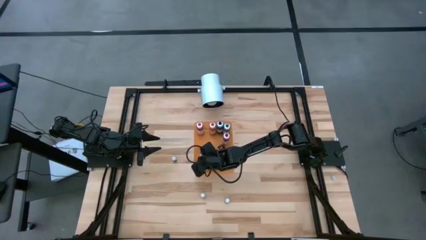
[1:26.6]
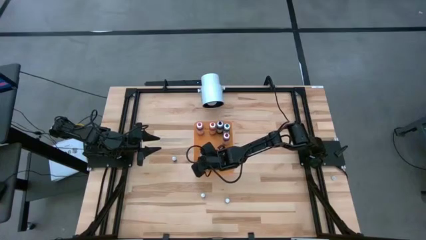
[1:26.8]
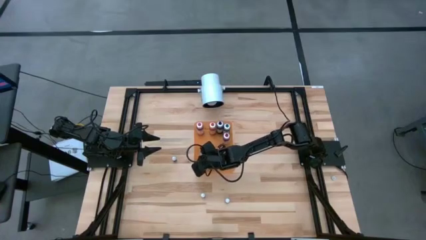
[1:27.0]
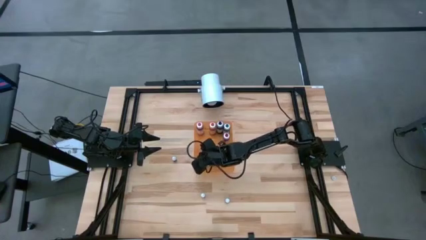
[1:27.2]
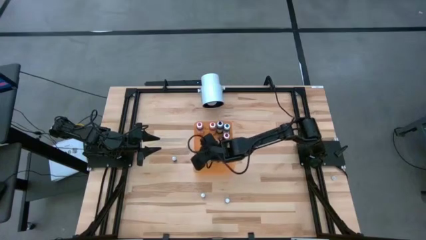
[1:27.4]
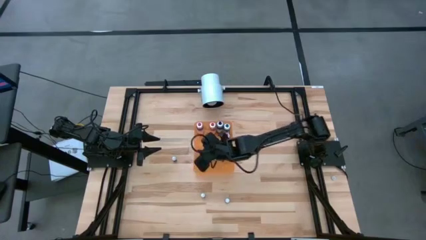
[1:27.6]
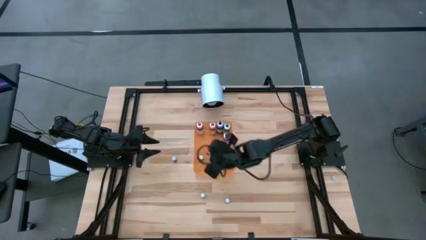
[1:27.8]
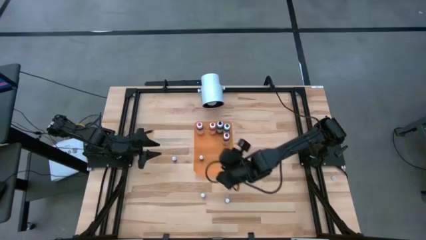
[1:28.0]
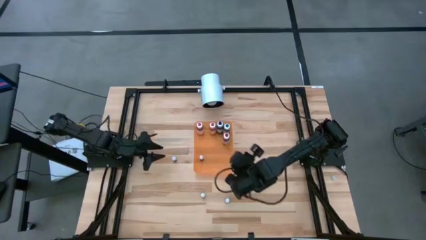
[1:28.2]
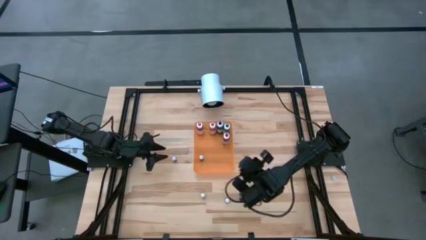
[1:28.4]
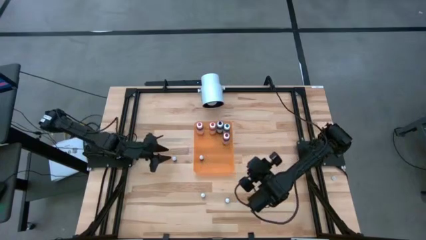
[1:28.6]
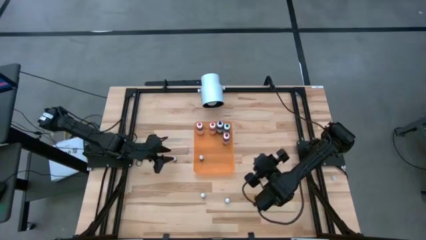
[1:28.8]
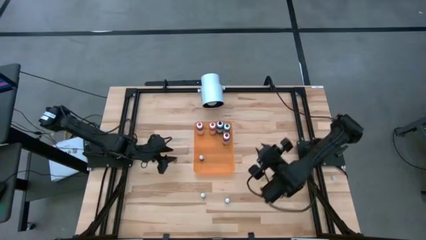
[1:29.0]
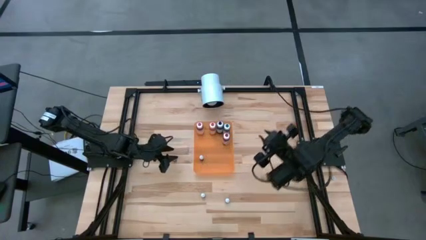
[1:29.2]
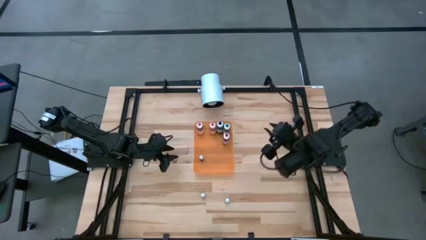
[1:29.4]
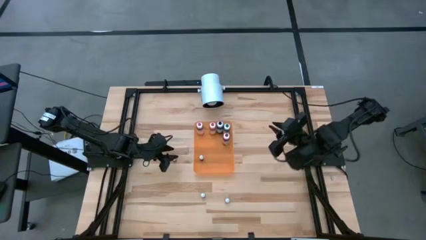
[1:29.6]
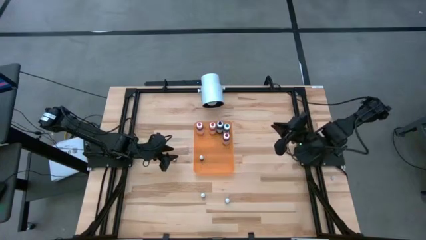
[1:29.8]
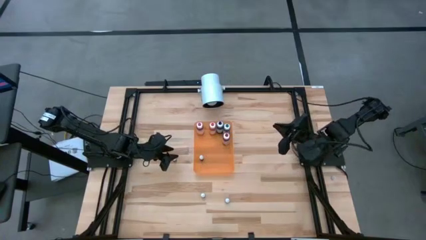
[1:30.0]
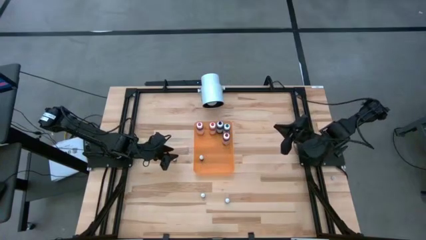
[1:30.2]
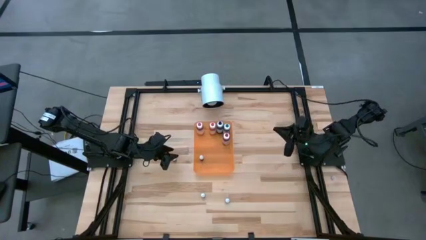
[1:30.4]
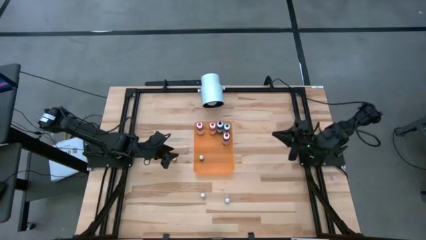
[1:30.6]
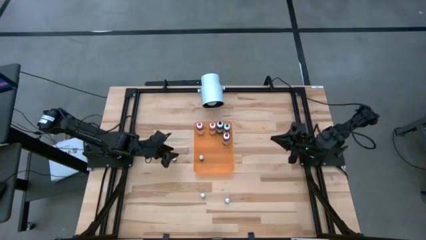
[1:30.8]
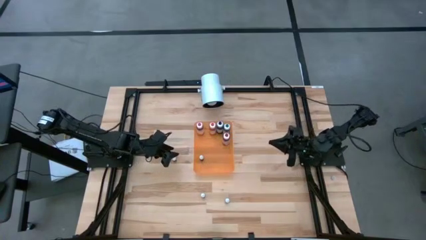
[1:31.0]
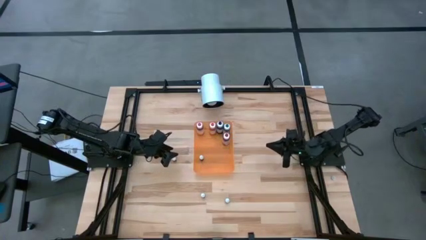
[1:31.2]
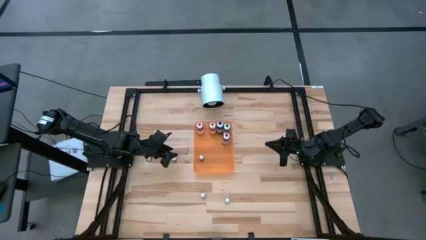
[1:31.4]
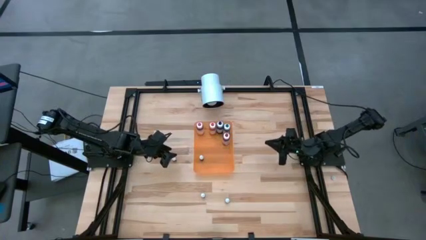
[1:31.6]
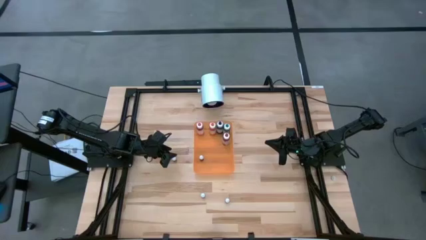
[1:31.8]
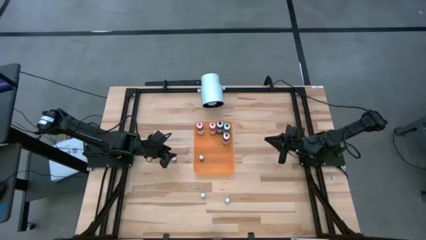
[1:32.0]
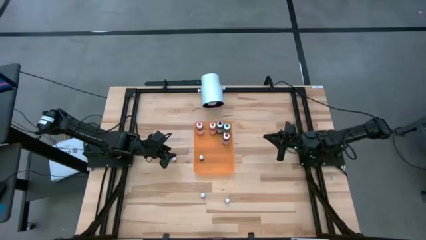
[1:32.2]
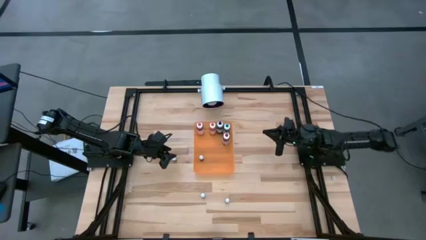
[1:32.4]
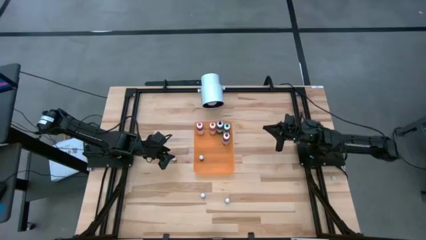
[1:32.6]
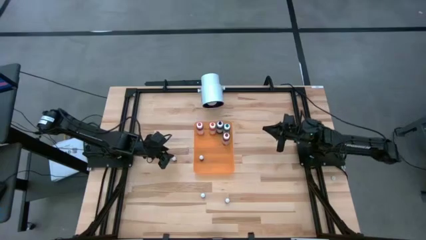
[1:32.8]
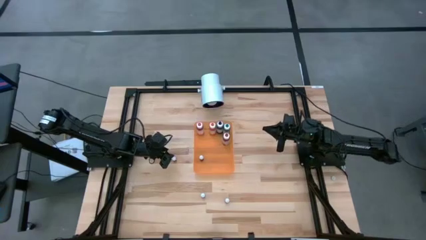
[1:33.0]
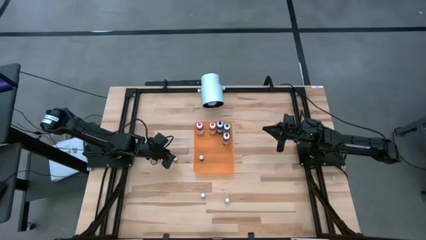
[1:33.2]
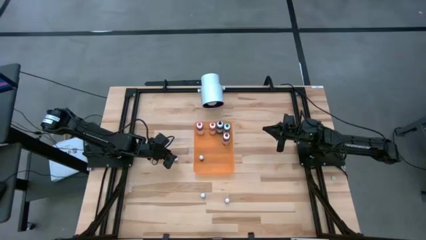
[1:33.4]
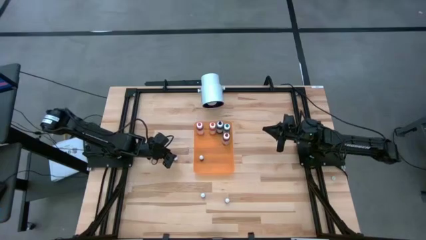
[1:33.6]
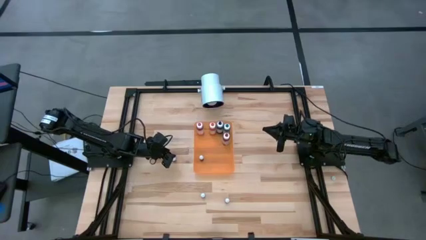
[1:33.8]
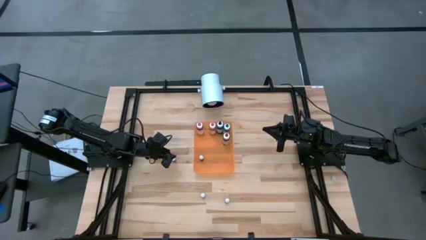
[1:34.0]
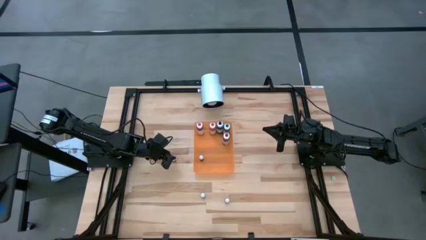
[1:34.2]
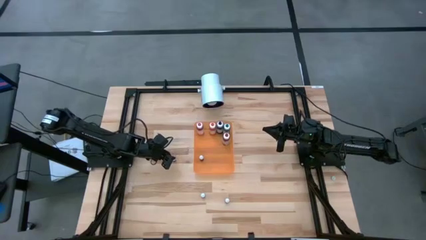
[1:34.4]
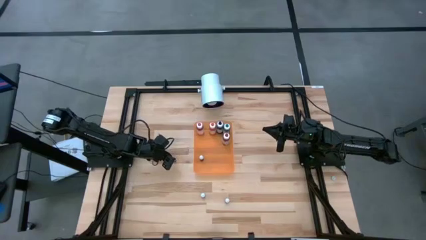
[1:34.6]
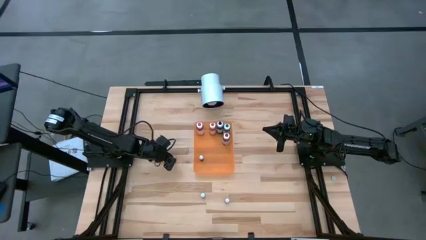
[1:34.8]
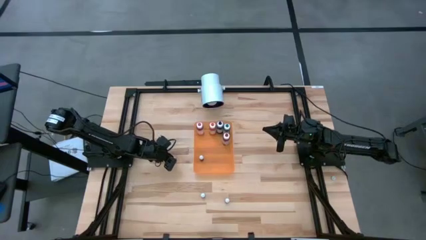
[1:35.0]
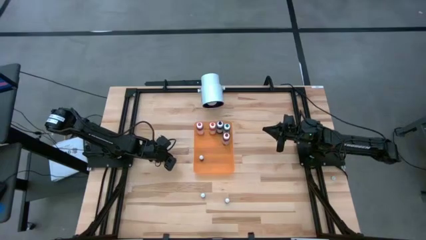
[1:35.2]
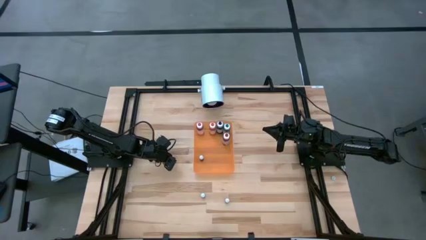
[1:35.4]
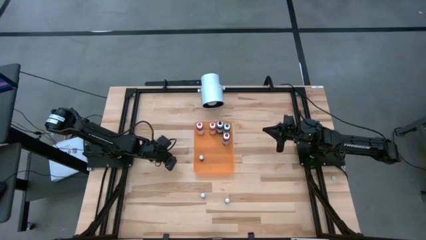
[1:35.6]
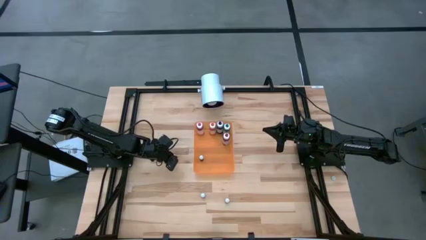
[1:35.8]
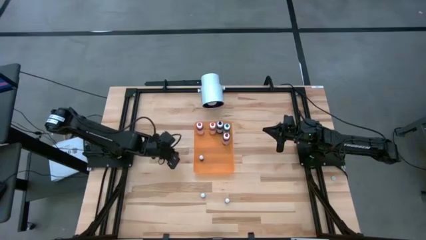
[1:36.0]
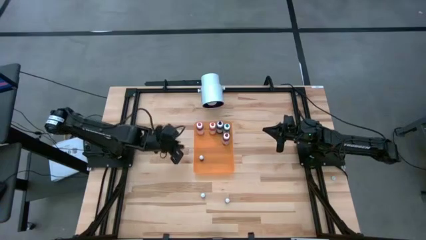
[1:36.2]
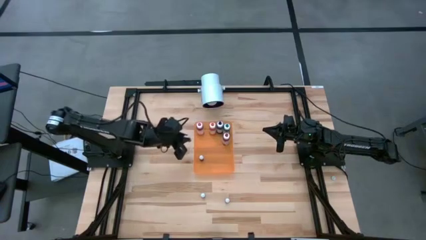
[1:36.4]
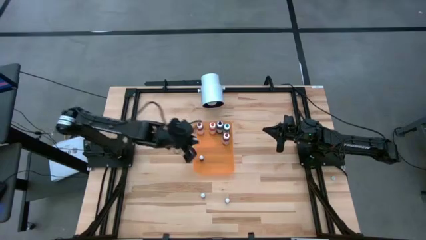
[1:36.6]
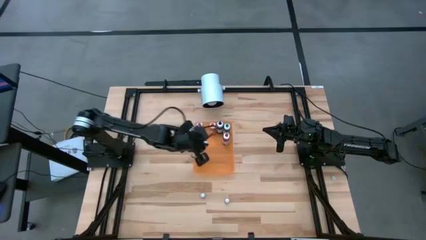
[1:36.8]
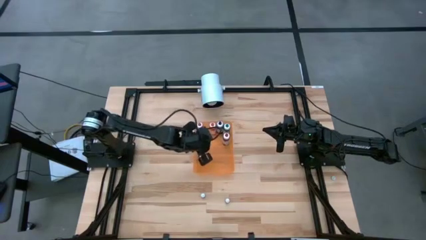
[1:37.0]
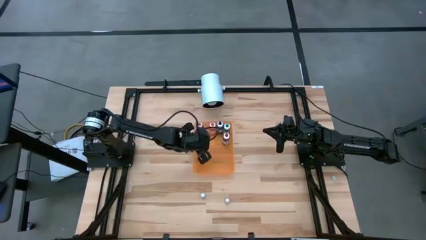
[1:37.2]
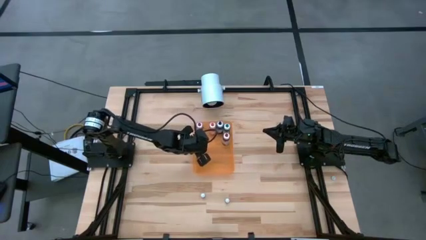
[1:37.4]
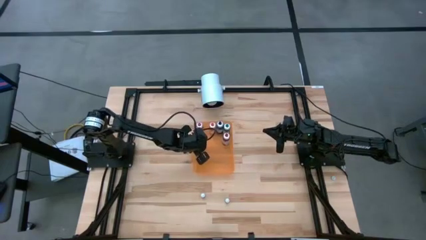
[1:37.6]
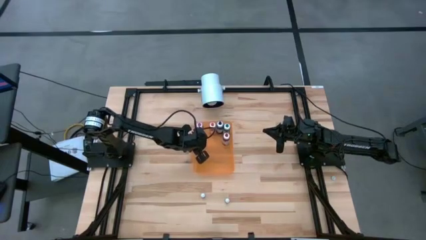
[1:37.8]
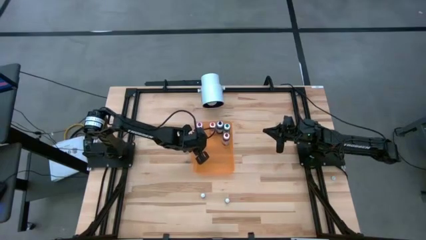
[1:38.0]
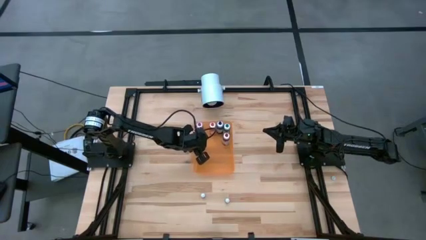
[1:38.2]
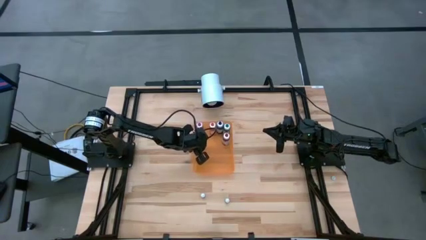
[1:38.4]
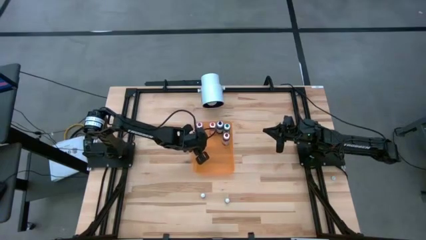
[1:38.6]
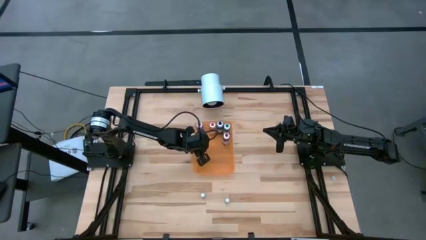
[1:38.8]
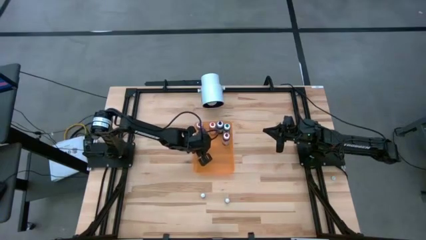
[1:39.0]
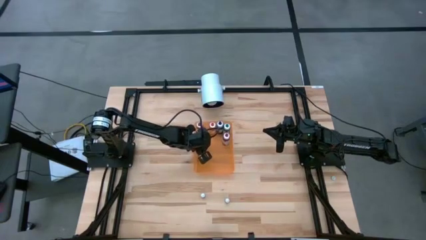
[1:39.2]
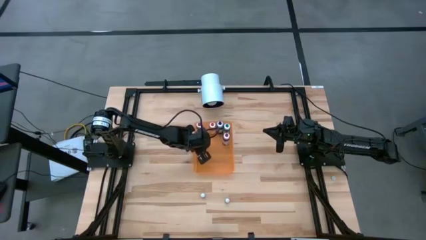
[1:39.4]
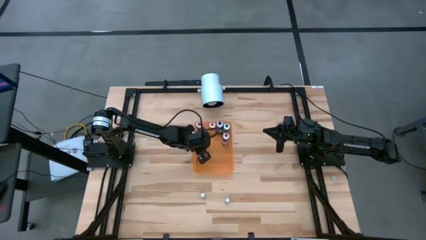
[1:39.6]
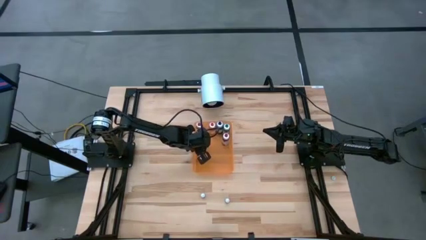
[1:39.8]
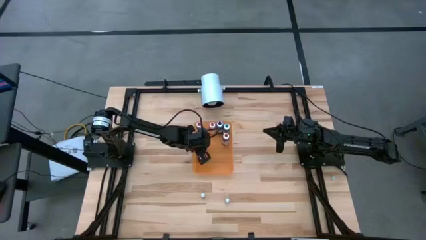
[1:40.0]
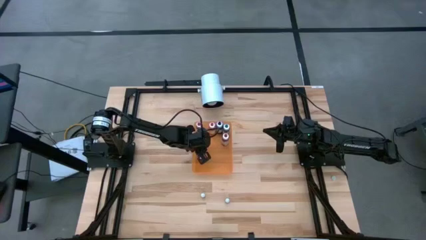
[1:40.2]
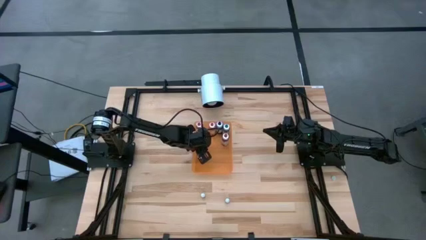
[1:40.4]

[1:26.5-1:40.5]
Task: Pick & Place food coloring
Put the small purple food coloring bottle into the bin
